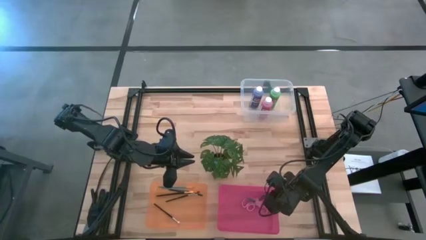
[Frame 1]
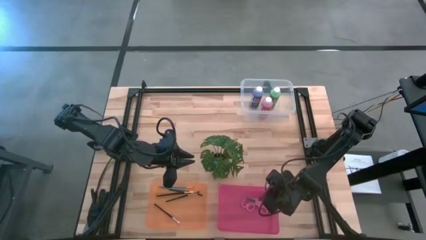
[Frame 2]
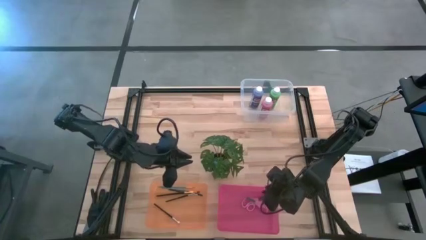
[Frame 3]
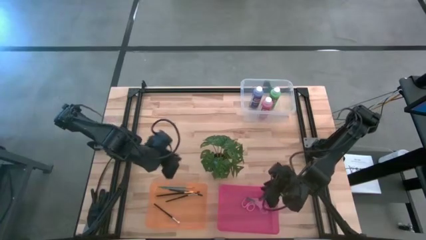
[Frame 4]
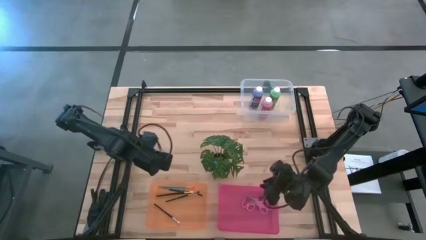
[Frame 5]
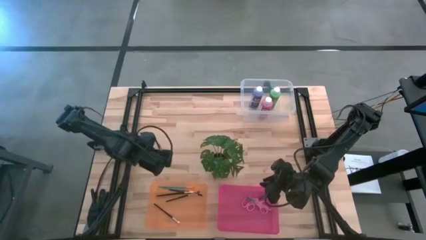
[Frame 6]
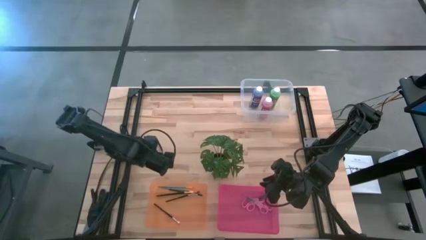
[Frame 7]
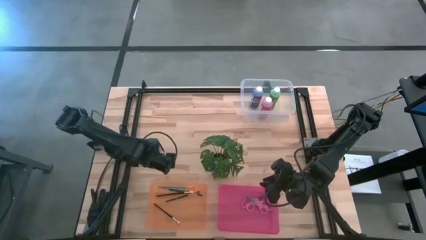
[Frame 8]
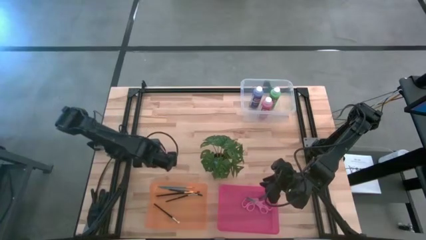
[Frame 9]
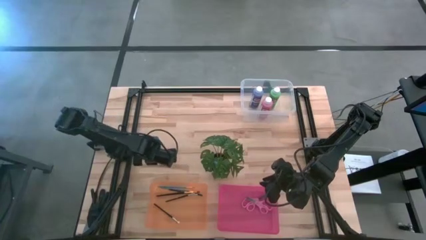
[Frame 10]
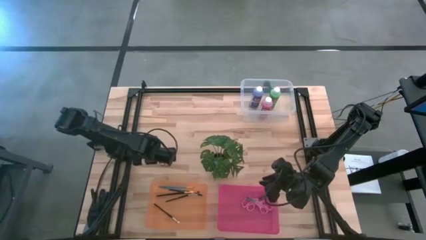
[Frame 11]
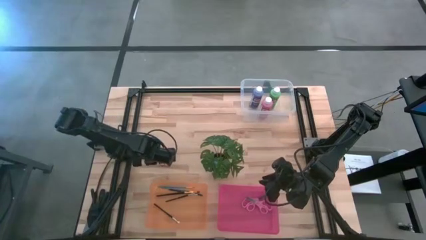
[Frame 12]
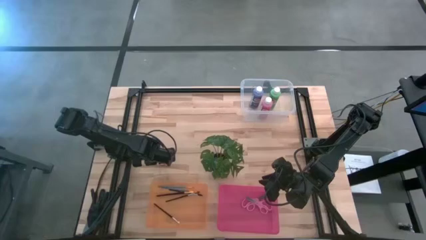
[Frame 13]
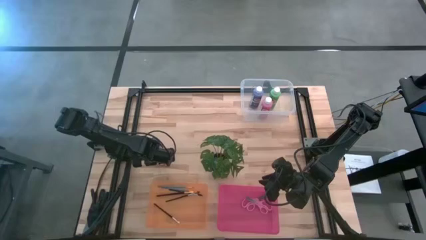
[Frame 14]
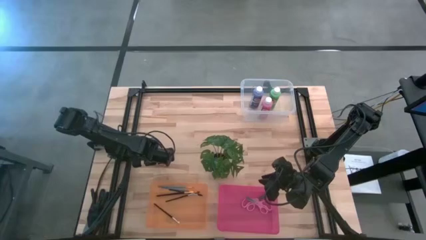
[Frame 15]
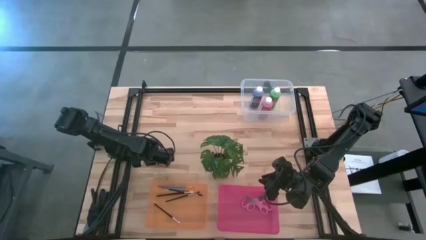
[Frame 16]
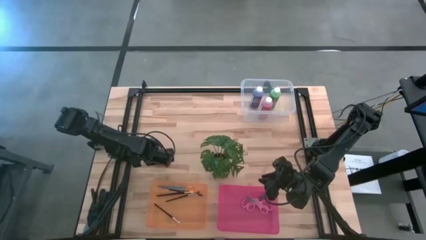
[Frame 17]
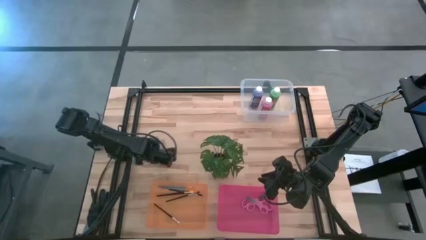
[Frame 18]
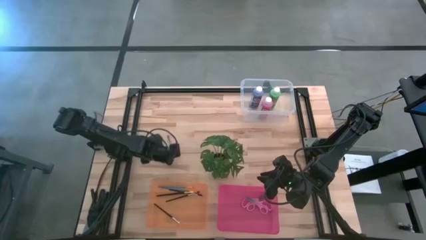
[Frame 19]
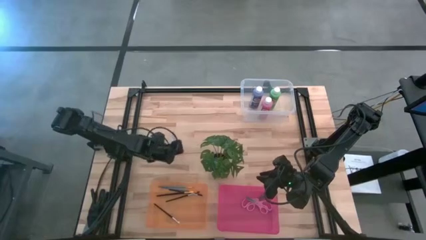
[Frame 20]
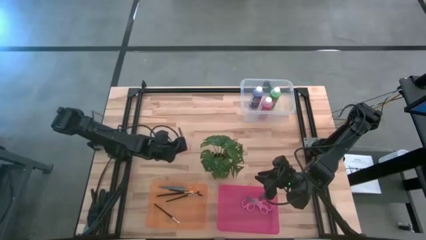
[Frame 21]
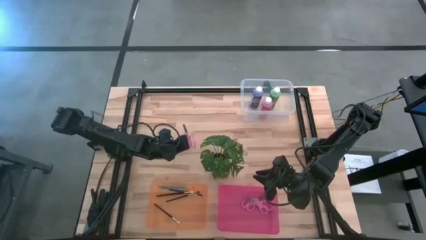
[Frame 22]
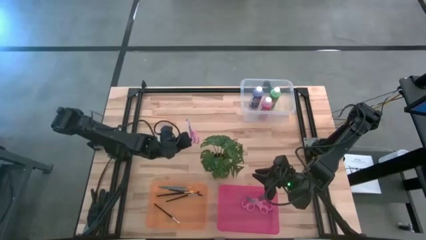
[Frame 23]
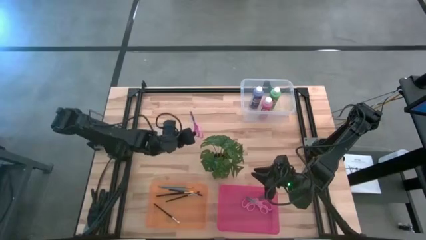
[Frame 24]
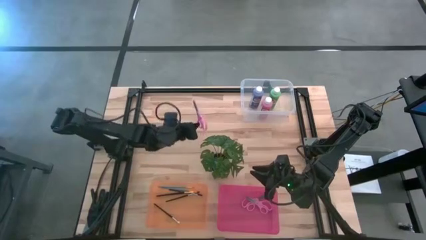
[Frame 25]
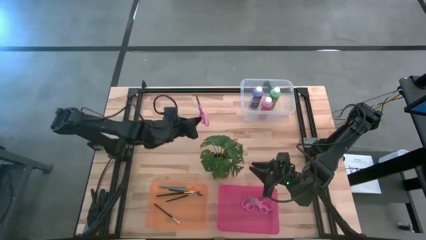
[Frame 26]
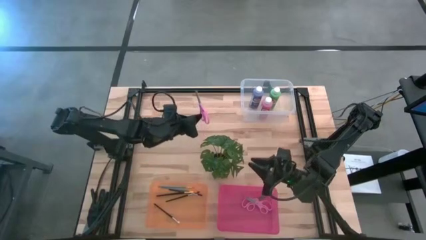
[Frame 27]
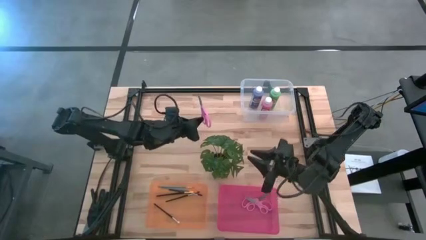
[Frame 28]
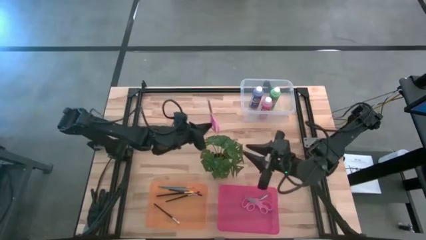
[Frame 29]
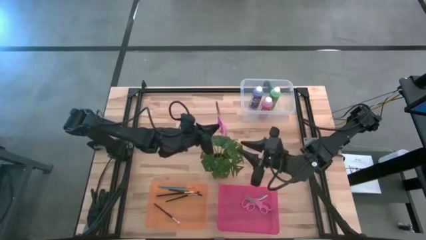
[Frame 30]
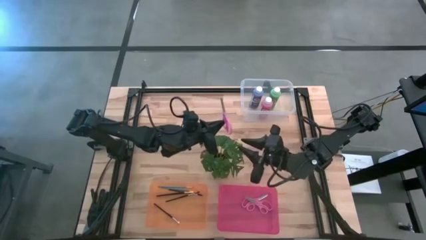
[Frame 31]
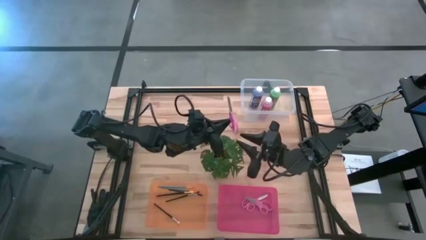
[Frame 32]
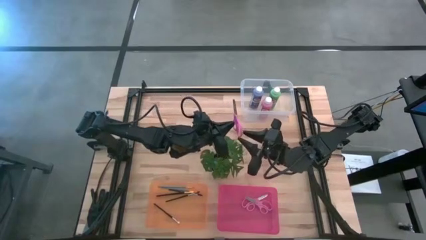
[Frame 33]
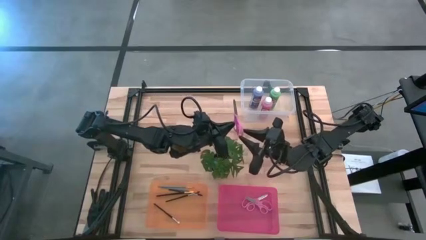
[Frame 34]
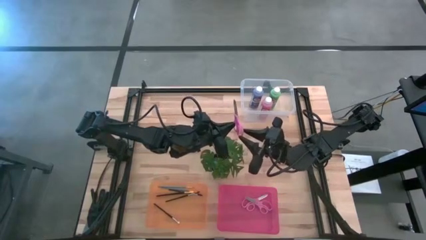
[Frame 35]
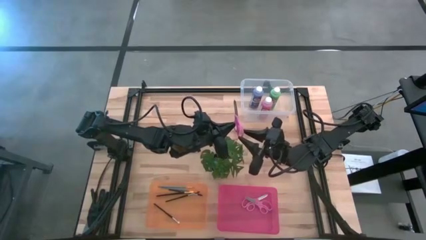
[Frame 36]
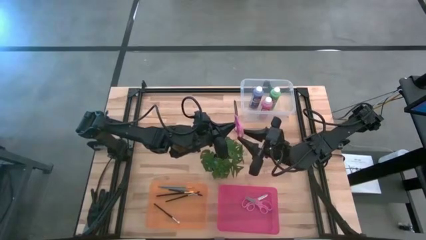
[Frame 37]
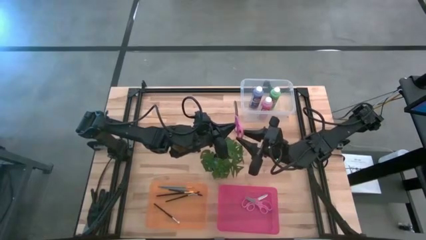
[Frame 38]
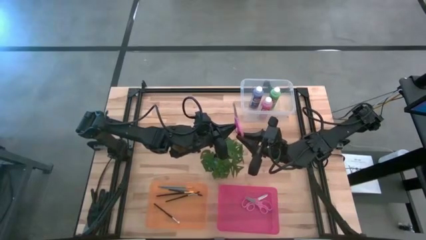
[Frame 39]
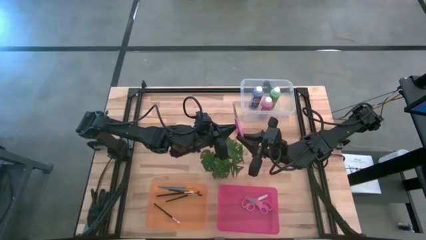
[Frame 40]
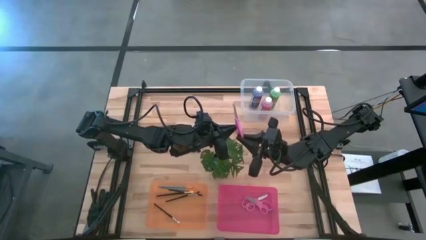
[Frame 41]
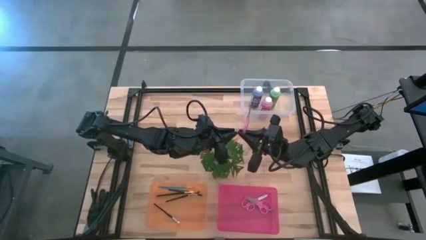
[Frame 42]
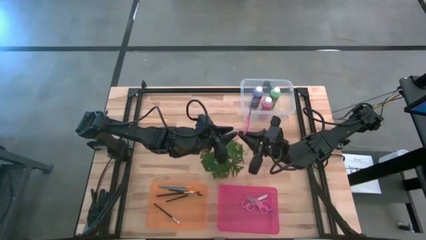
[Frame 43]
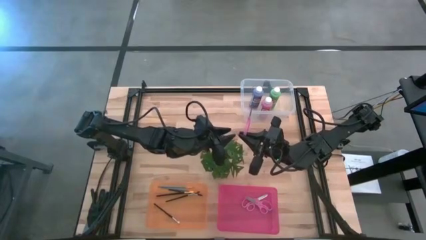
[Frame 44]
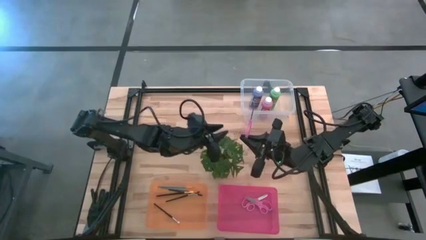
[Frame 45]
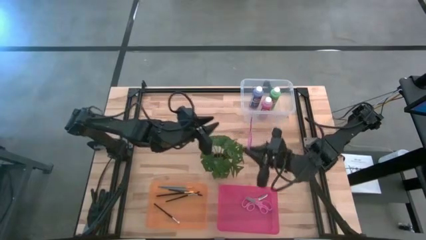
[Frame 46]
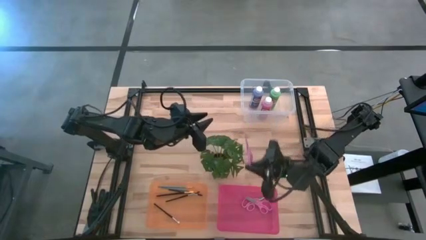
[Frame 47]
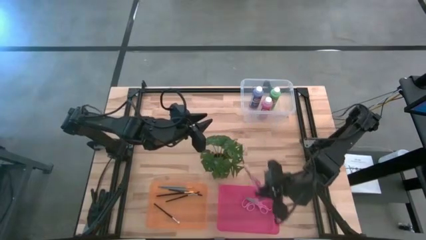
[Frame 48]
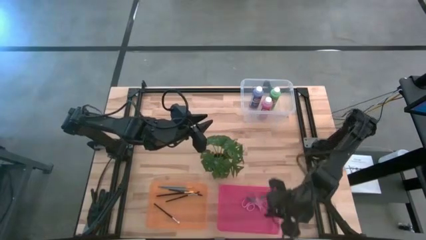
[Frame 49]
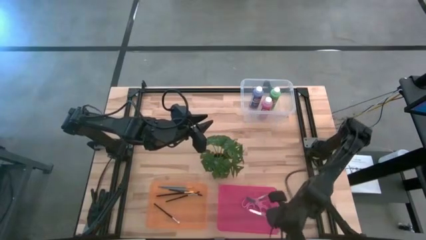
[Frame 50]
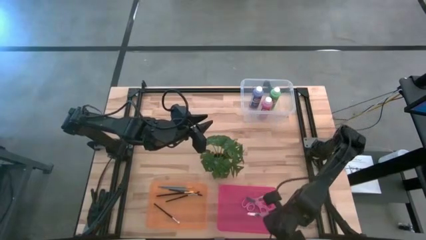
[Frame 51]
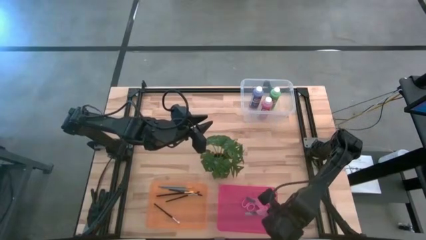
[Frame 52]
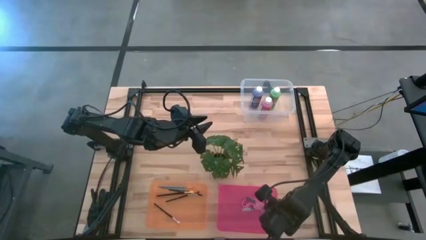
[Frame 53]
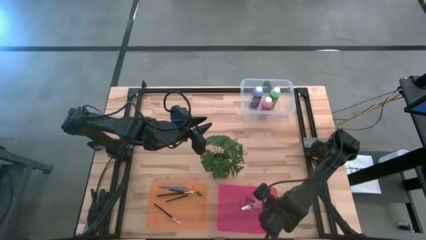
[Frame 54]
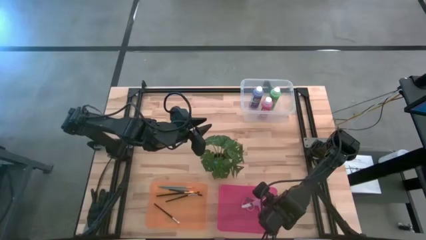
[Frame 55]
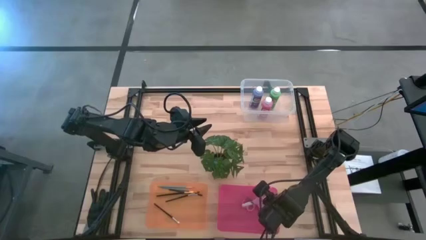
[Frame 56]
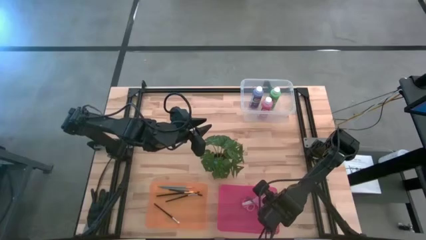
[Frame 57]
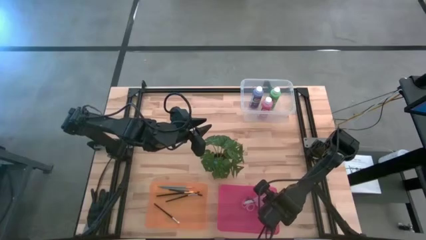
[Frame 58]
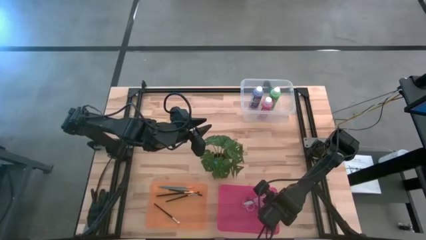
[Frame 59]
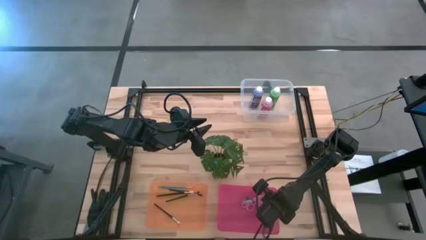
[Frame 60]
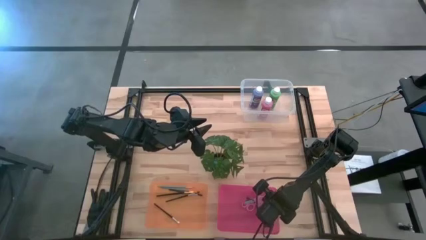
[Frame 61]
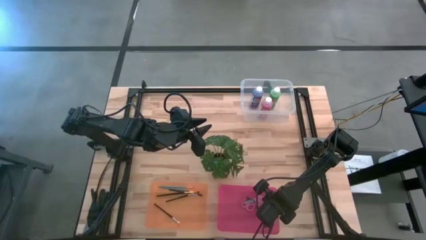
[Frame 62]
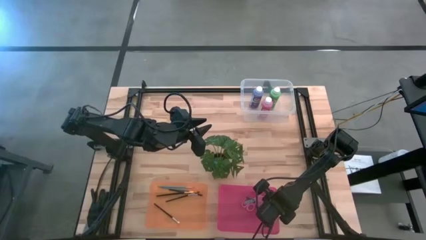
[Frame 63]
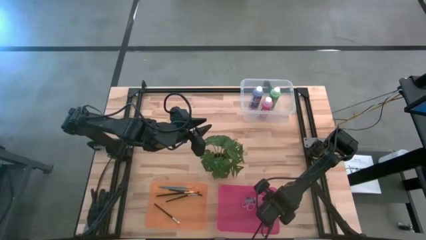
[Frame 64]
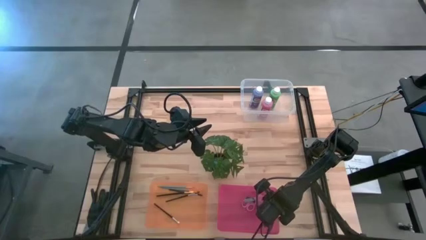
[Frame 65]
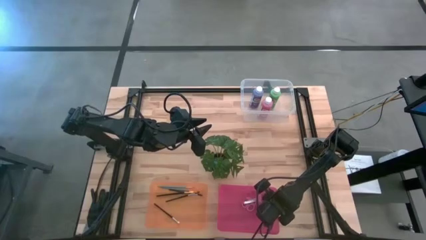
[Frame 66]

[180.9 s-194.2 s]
Task: Pick & Place Paint Supplies
Put the pink scissors into the pink bin
